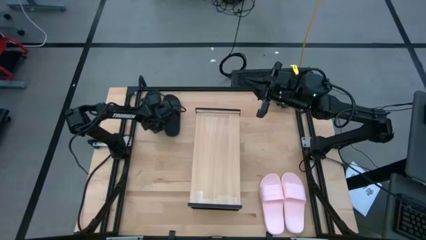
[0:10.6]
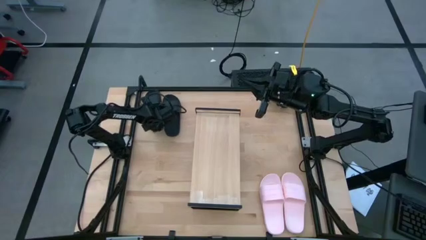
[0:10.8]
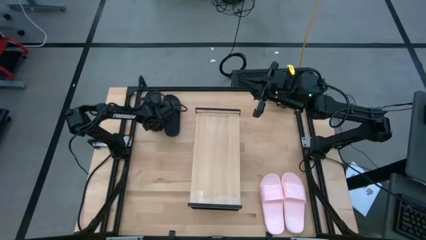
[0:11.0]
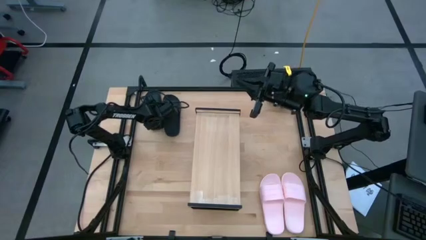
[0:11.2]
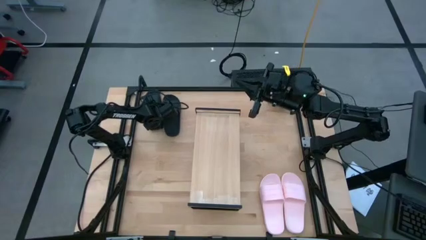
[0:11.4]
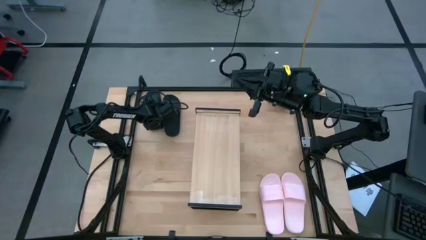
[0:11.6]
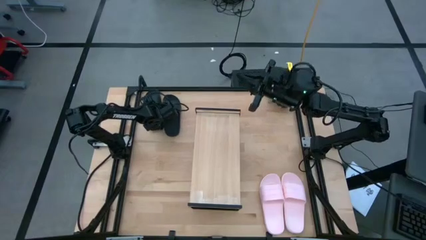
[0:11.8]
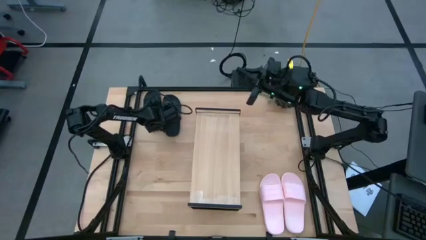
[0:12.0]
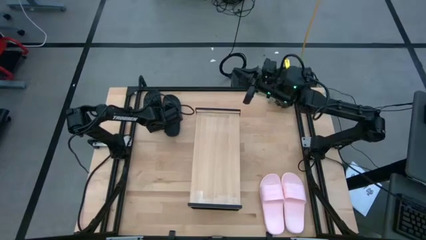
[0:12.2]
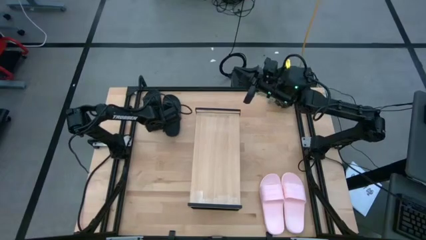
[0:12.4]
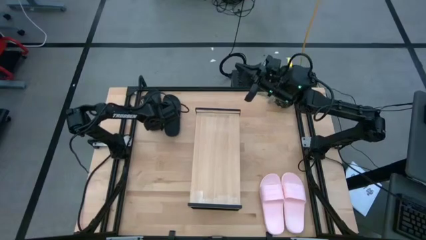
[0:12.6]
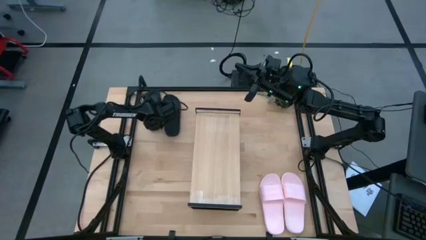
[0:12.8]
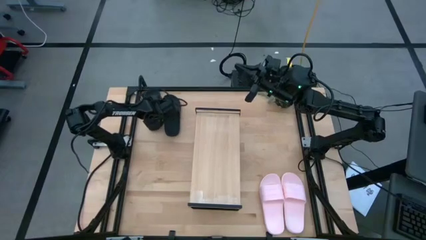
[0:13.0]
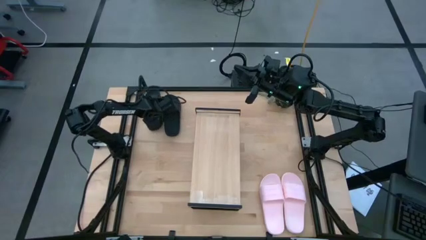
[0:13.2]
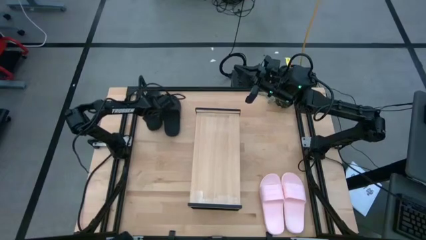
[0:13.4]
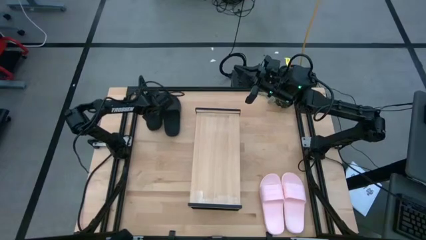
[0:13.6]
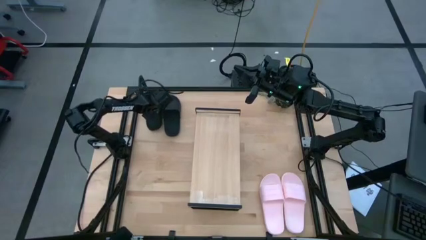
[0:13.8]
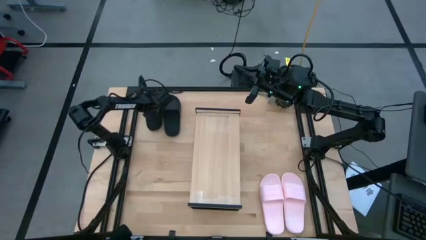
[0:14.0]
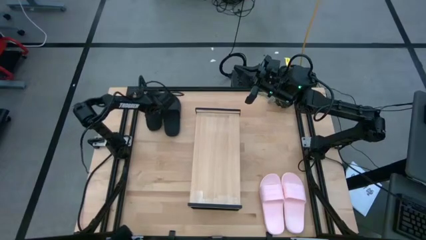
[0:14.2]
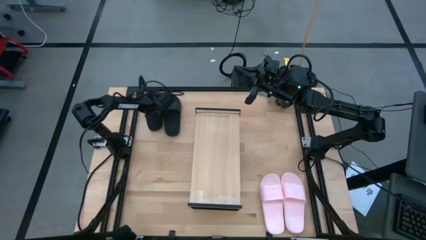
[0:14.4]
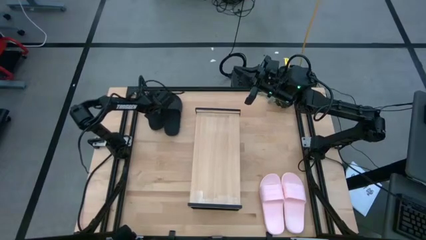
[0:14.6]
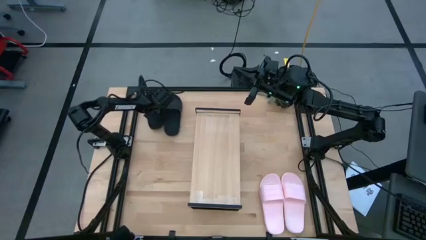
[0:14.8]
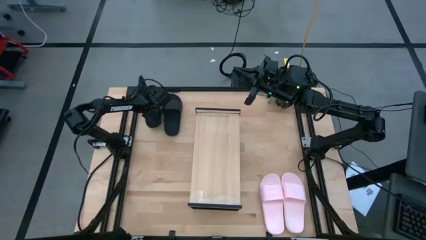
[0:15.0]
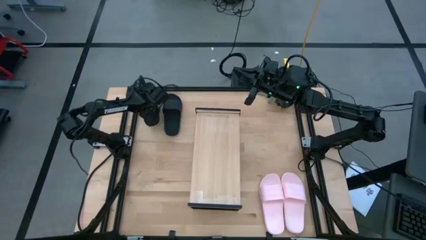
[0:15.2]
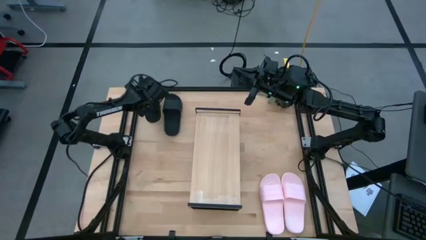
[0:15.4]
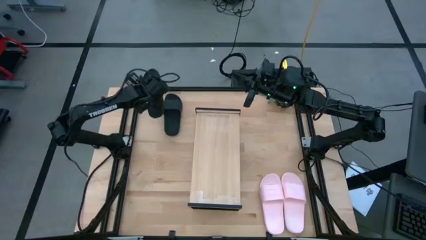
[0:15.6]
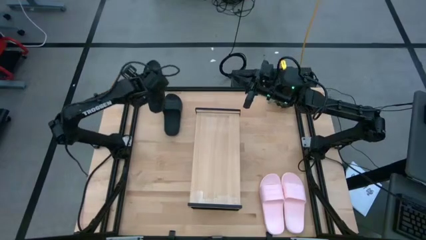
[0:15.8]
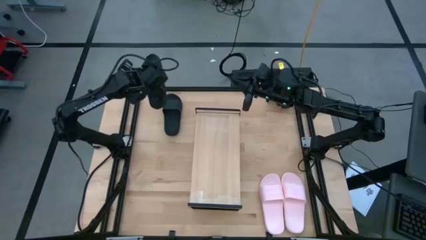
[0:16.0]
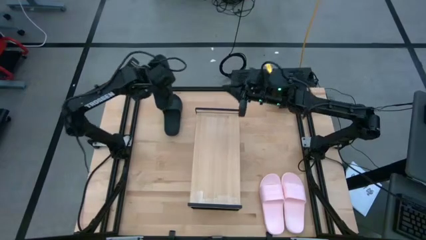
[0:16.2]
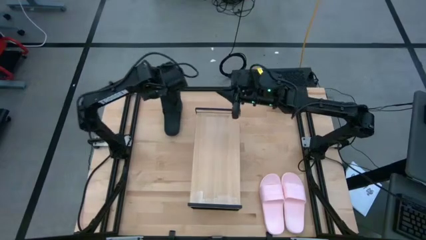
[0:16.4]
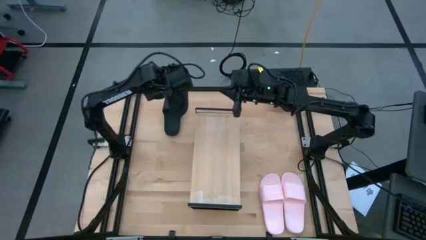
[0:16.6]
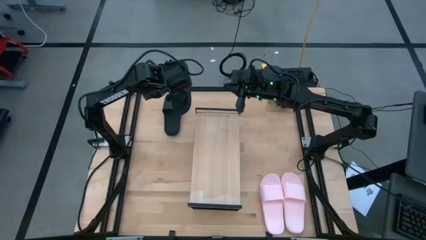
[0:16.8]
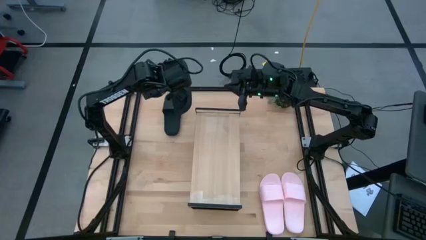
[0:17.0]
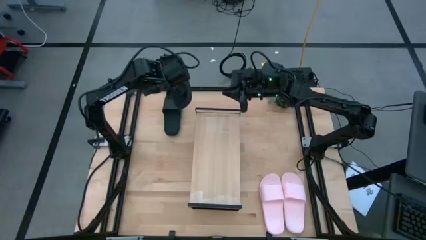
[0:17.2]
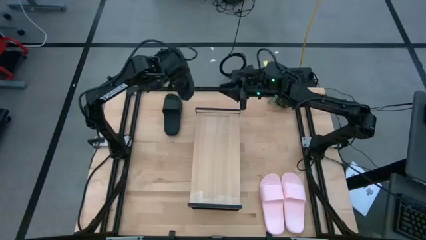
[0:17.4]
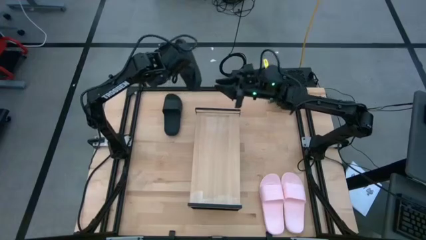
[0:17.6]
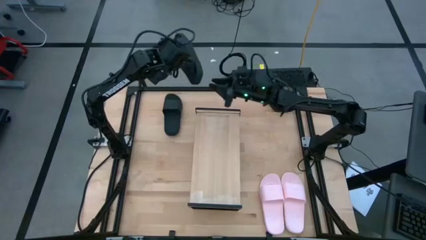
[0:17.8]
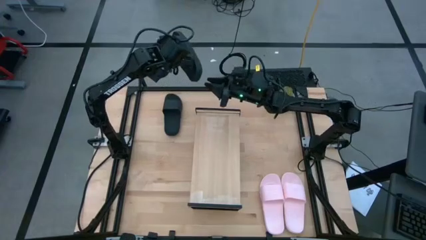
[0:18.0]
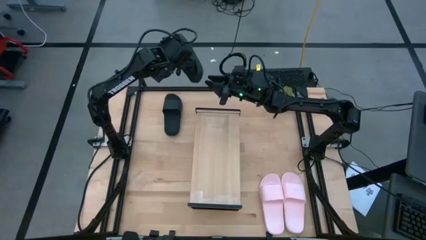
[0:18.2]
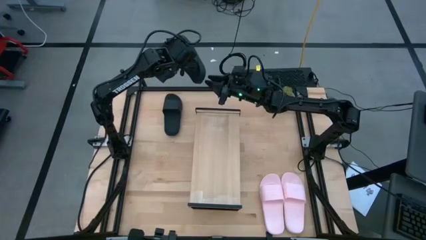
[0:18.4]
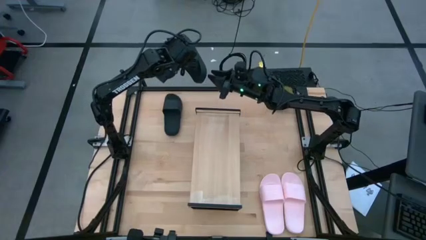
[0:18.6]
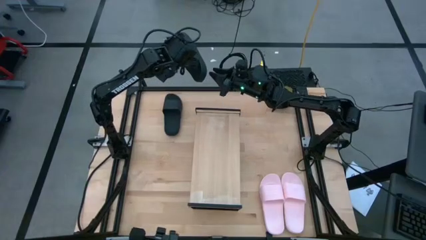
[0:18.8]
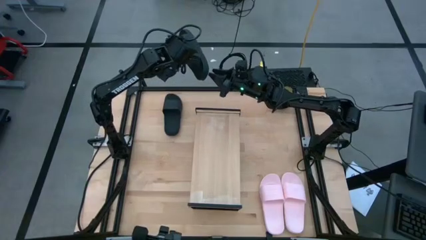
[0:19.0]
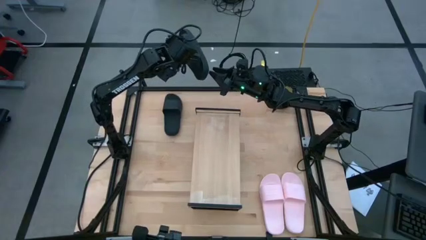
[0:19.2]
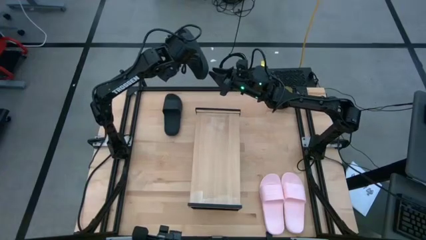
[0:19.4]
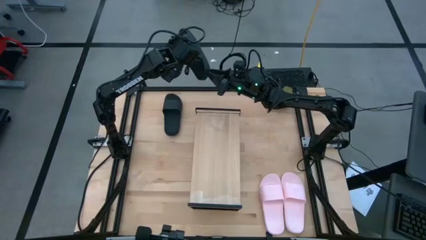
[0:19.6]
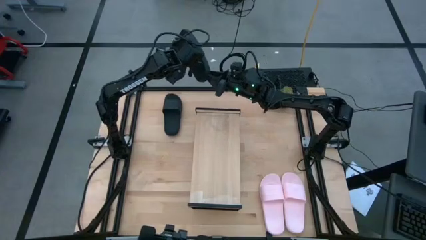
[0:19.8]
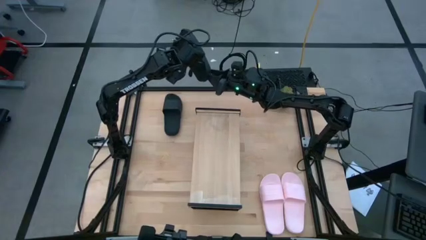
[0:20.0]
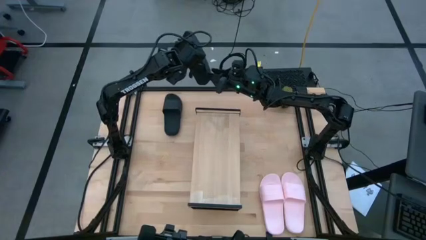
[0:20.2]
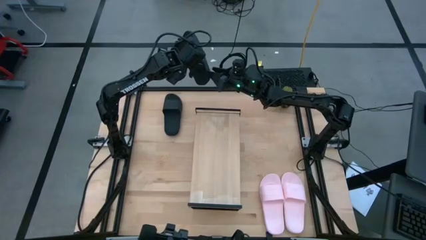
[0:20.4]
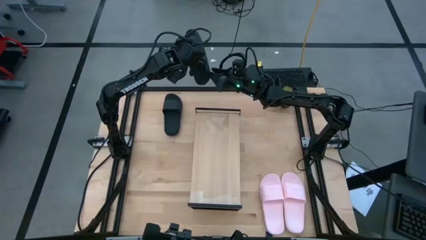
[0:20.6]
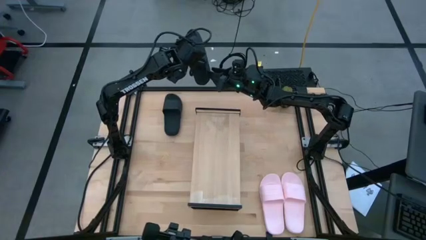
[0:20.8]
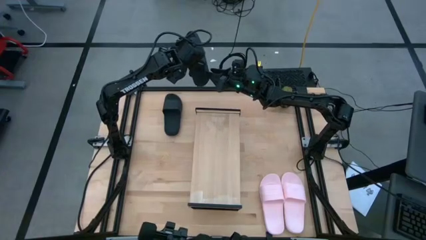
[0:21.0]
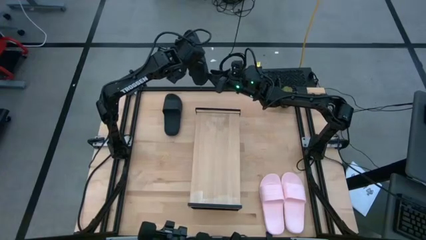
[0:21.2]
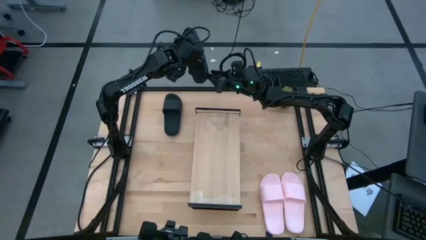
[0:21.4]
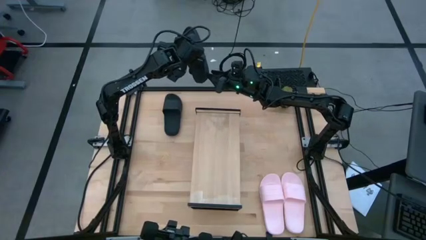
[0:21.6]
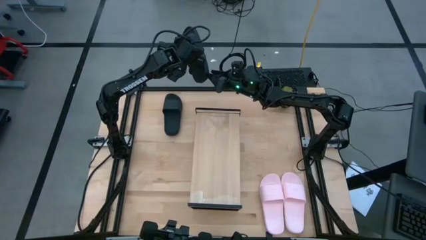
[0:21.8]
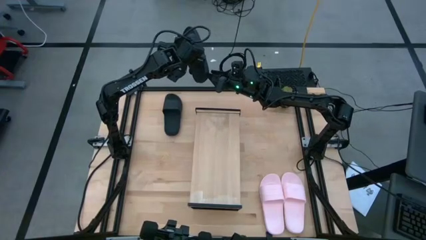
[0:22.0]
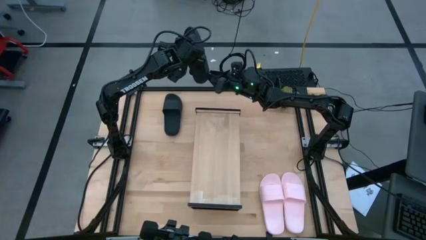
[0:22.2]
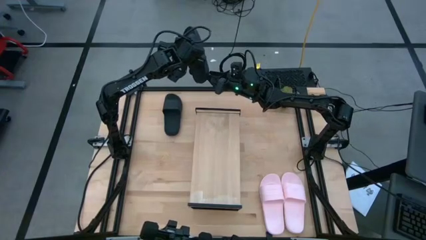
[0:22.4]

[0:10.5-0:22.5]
Task: Pick and place slides into the shelf
Put the left black slipper on the shelf
